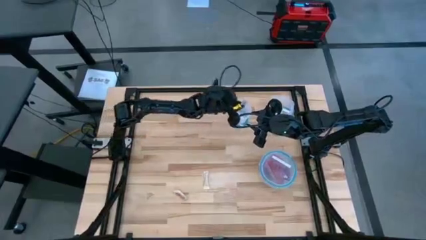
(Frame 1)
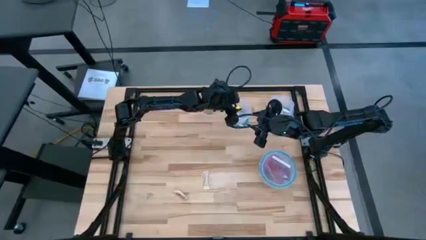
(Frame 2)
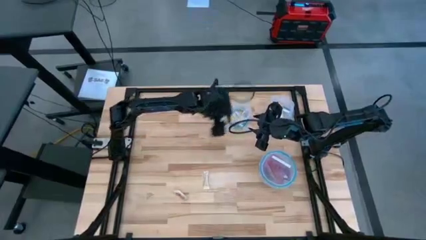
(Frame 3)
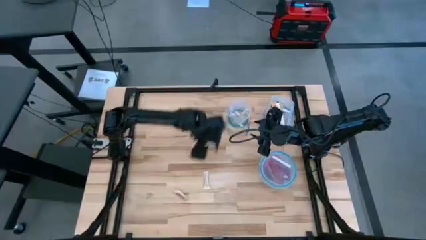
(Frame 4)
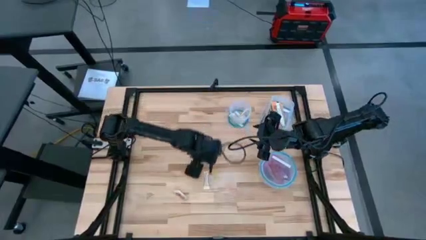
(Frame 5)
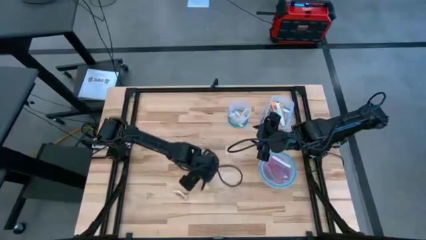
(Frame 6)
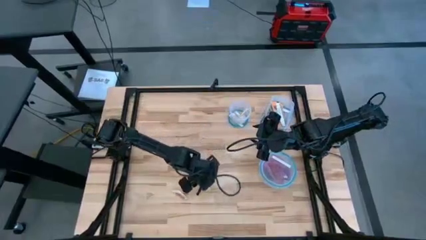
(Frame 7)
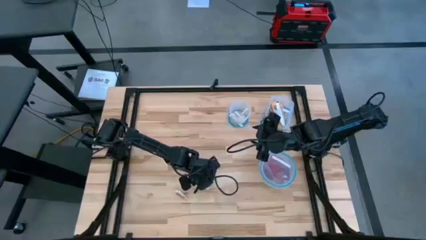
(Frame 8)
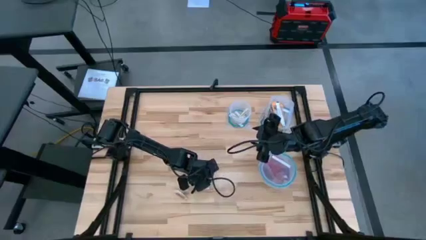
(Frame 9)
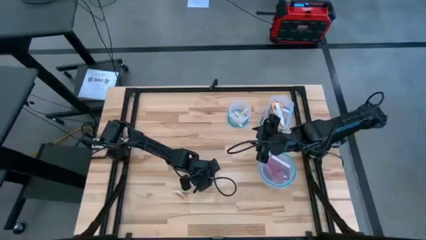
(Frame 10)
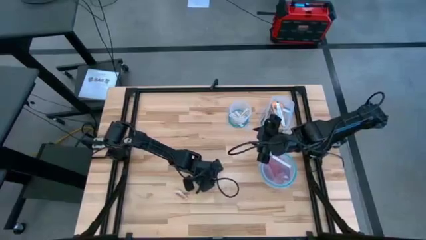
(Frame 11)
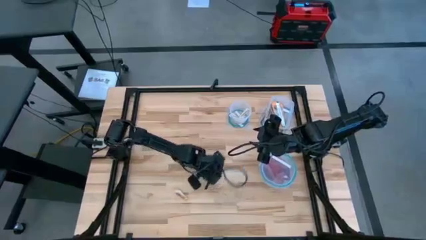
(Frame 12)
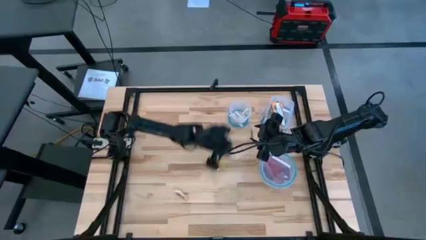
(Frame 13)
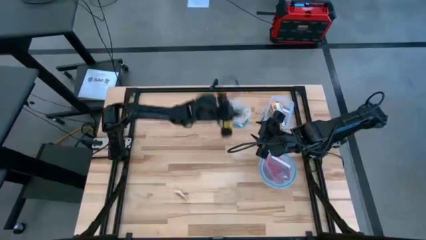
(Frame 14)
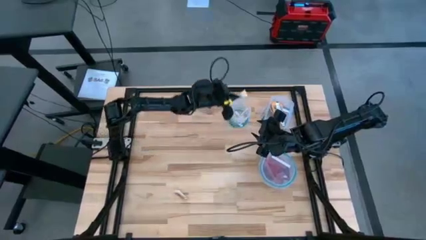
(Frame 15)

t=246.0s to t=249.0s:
Task: Sort candy
Put the white candy into the small round transparent bin

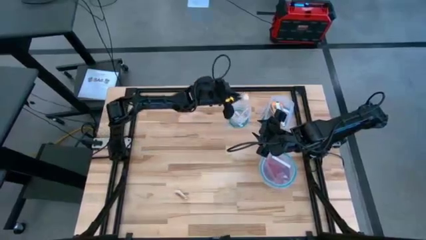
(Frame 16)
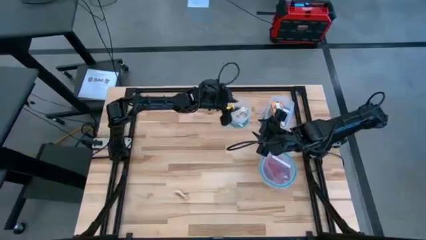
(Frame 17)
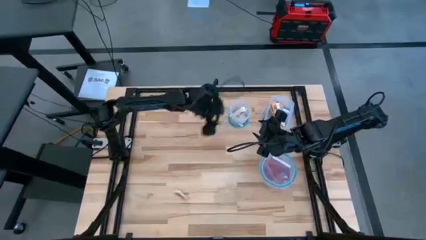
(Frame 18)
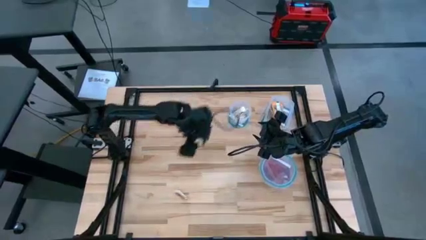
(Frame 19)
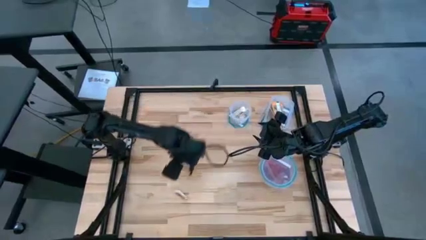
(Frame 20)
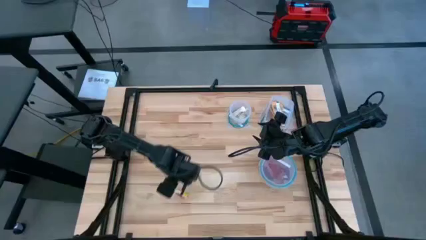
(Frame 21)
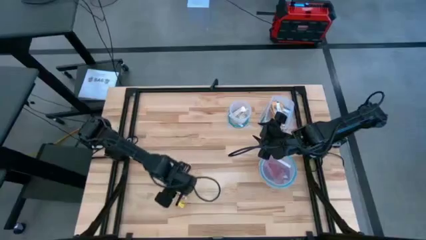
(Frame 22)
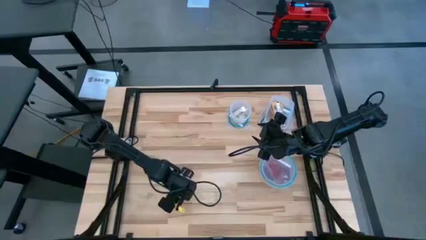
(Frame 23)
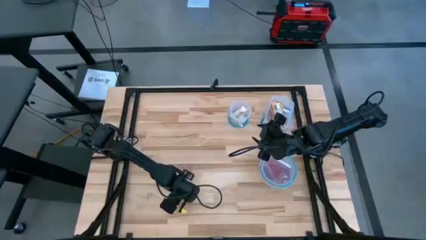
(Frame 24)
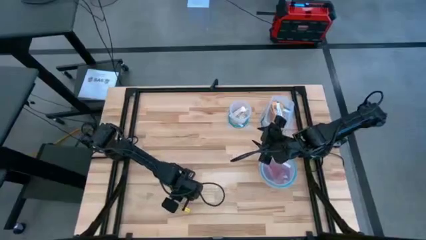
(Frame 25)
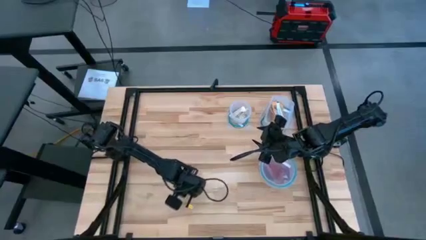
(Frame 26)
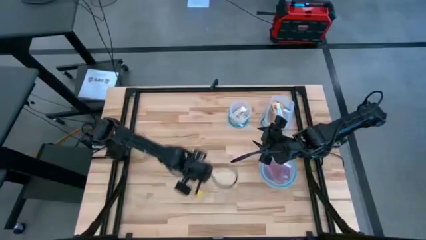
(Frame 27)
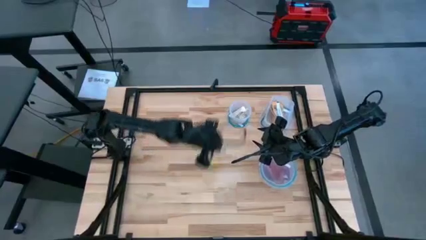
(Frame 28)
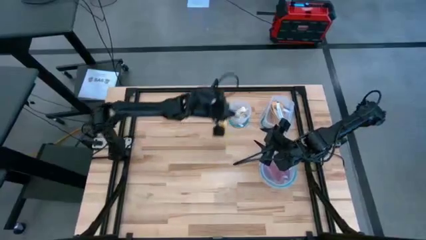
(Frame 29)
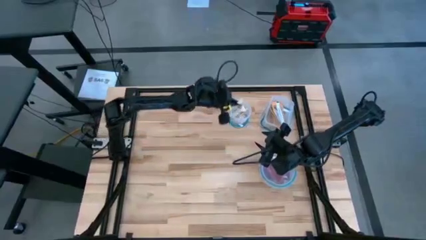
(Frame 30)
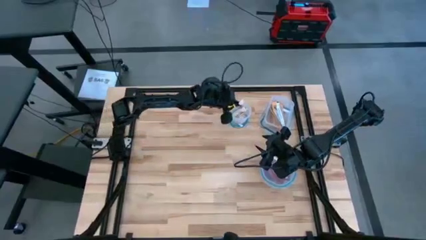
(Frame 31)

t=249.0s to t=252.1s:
Put the white candy into the small round transparent bin

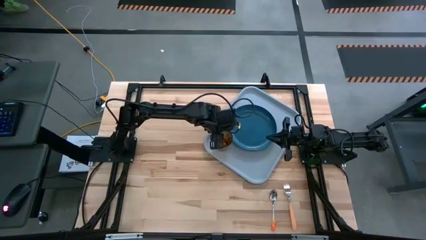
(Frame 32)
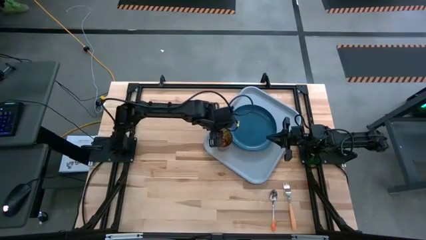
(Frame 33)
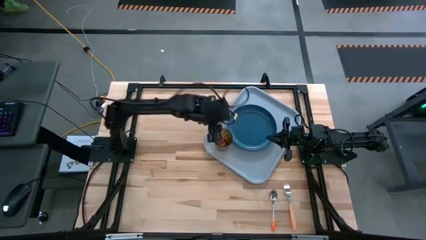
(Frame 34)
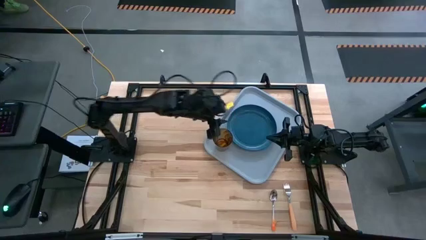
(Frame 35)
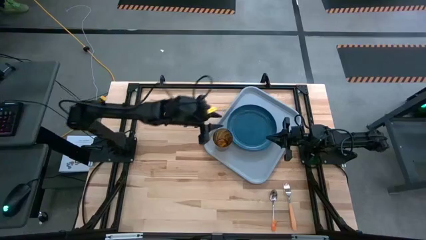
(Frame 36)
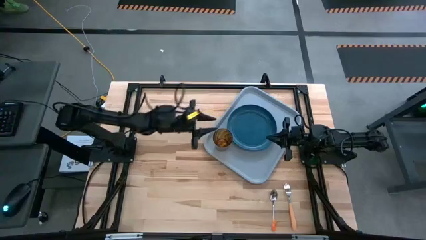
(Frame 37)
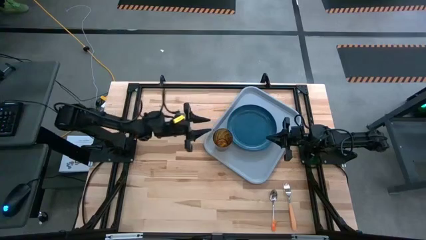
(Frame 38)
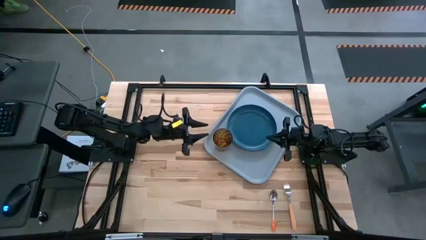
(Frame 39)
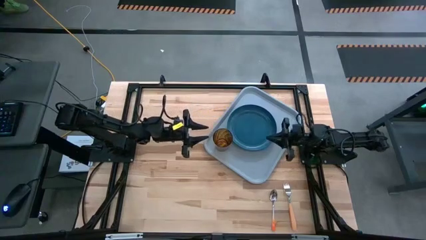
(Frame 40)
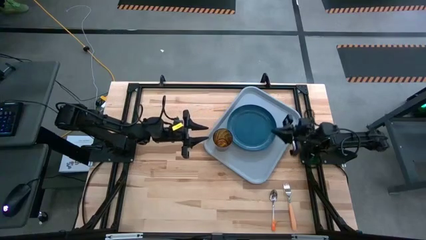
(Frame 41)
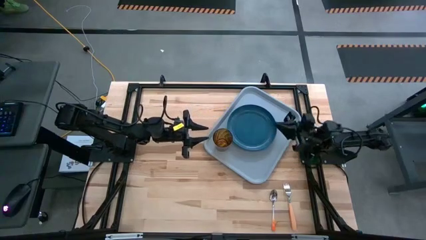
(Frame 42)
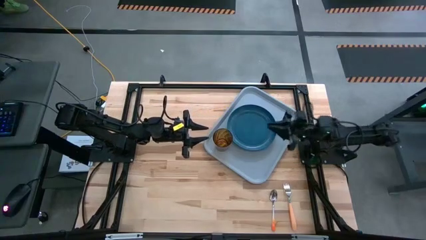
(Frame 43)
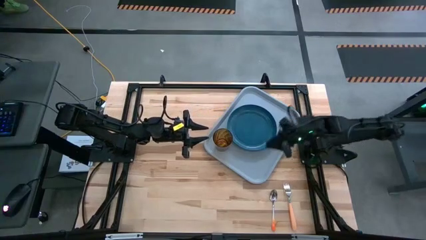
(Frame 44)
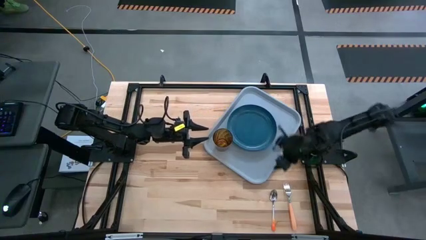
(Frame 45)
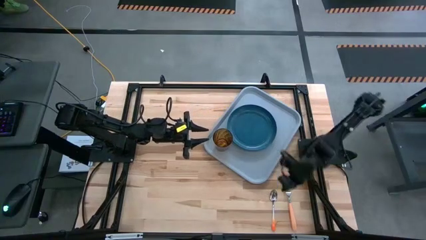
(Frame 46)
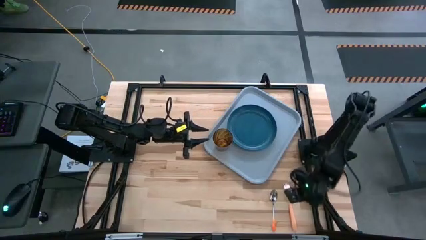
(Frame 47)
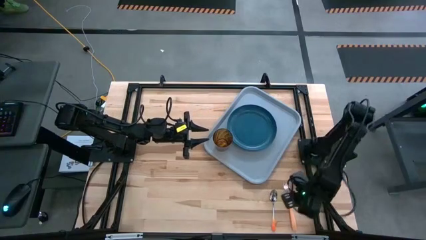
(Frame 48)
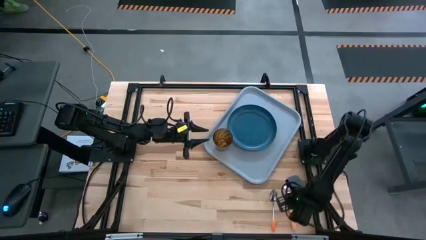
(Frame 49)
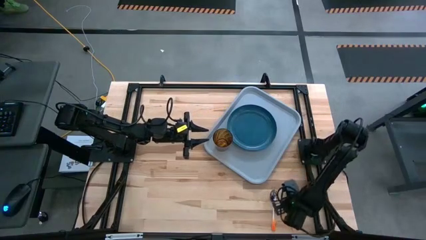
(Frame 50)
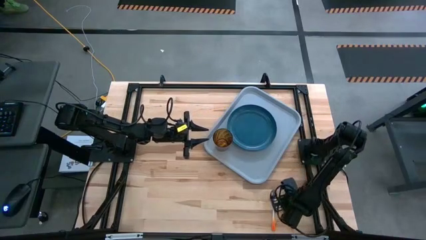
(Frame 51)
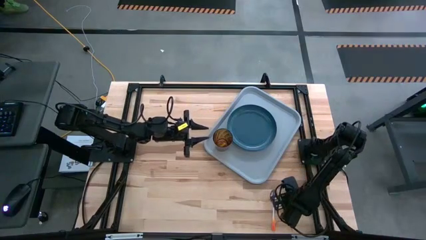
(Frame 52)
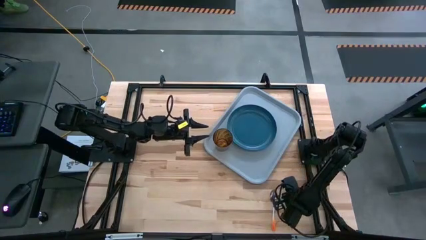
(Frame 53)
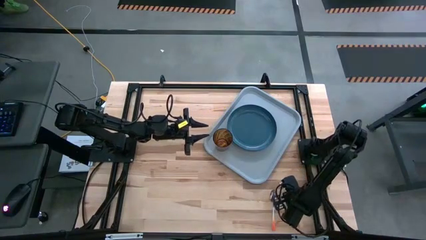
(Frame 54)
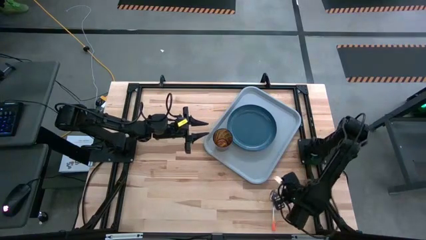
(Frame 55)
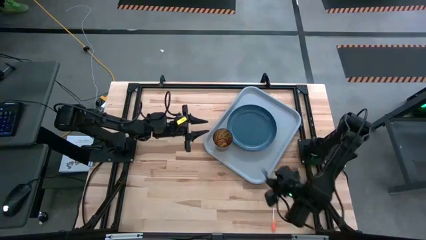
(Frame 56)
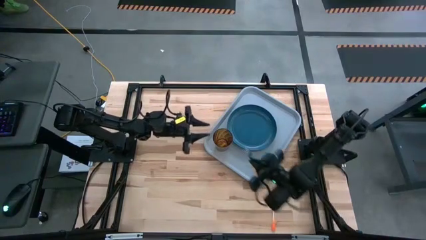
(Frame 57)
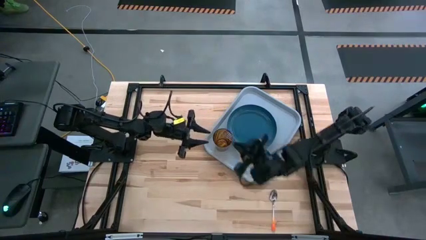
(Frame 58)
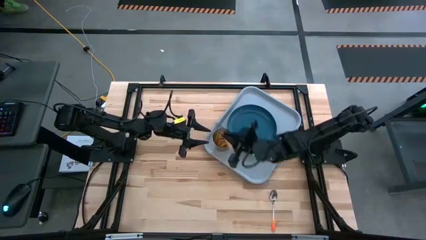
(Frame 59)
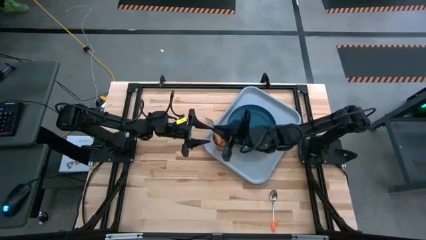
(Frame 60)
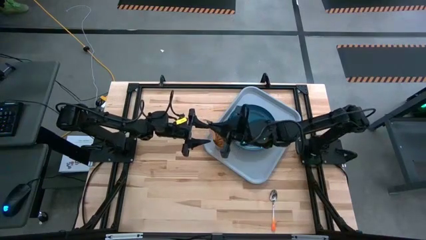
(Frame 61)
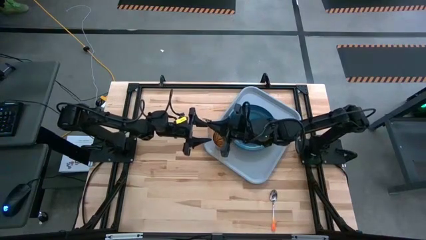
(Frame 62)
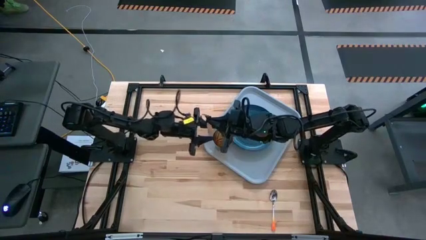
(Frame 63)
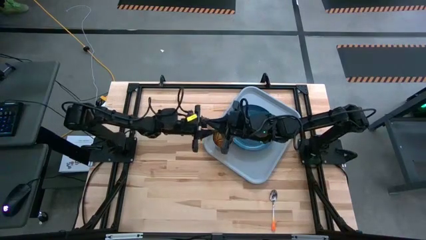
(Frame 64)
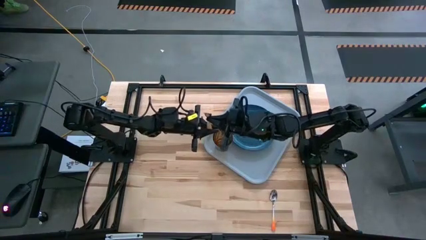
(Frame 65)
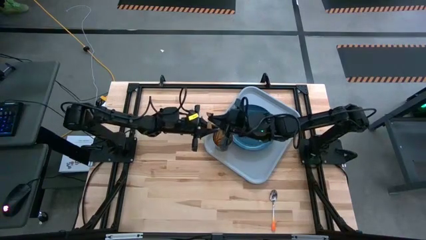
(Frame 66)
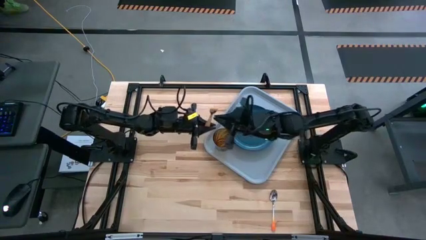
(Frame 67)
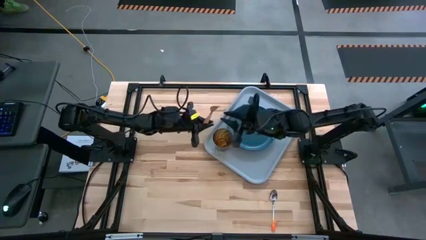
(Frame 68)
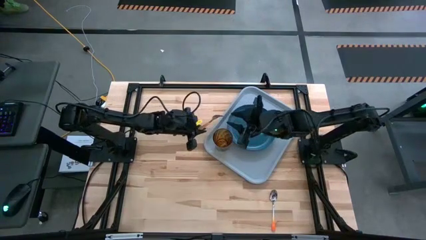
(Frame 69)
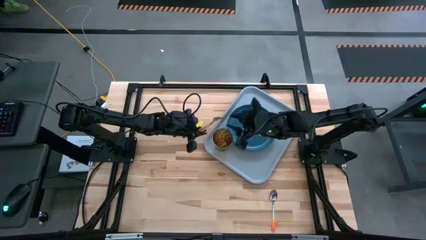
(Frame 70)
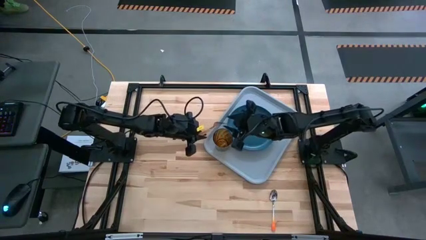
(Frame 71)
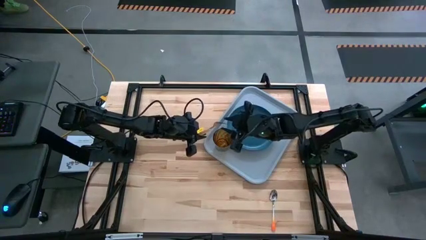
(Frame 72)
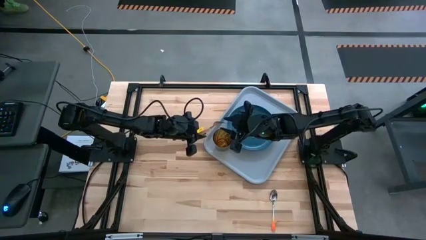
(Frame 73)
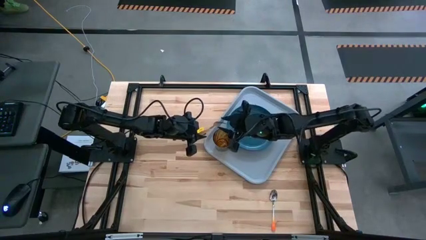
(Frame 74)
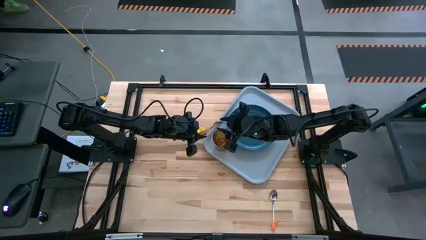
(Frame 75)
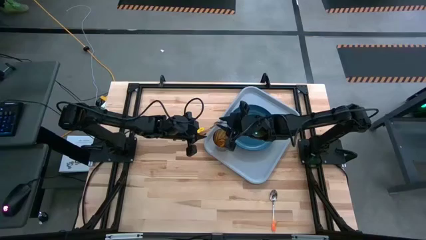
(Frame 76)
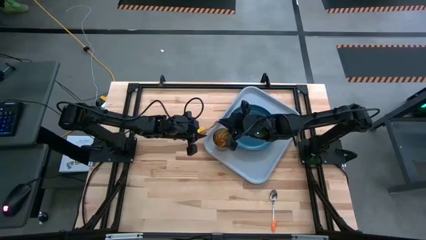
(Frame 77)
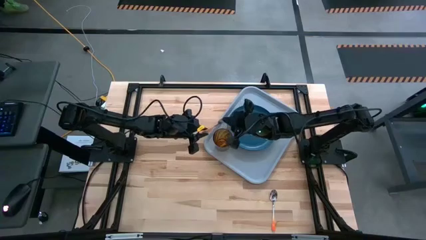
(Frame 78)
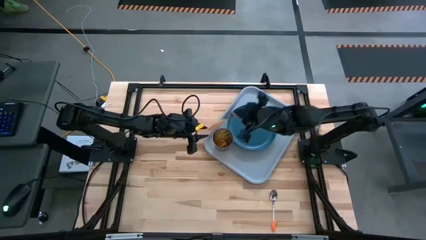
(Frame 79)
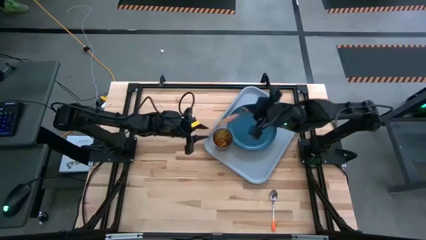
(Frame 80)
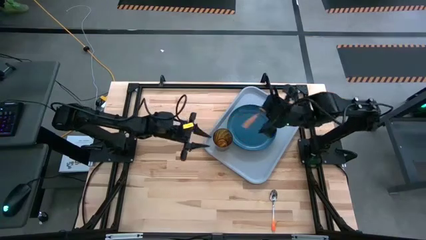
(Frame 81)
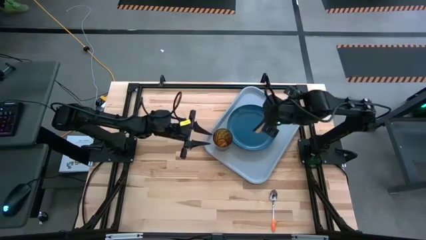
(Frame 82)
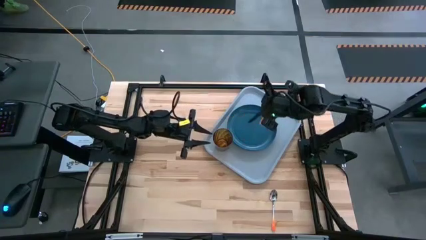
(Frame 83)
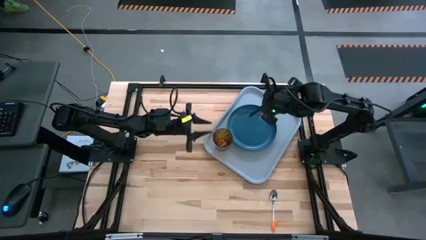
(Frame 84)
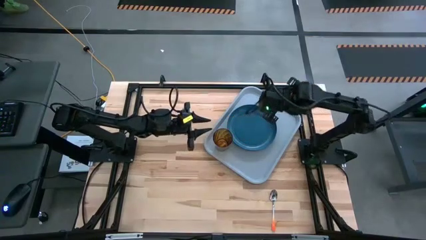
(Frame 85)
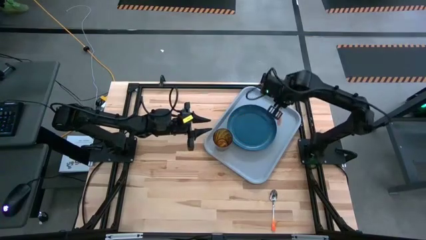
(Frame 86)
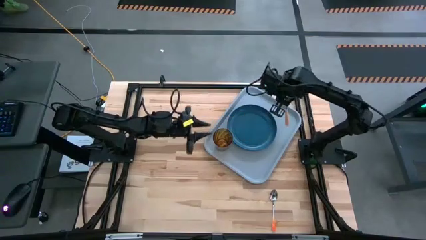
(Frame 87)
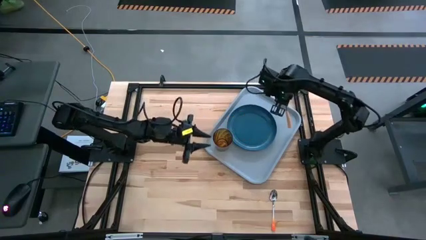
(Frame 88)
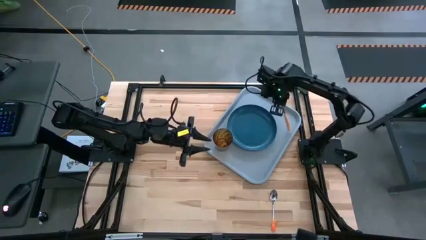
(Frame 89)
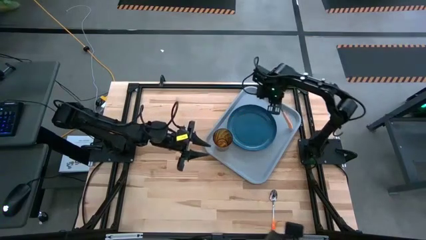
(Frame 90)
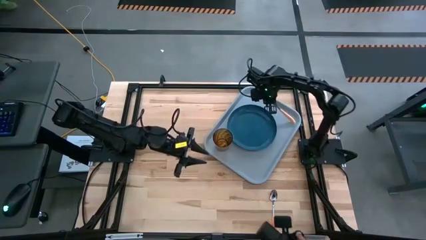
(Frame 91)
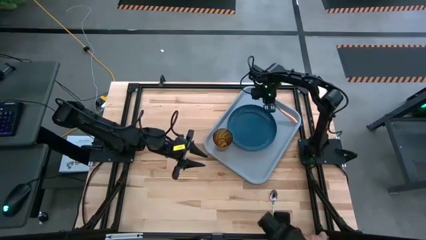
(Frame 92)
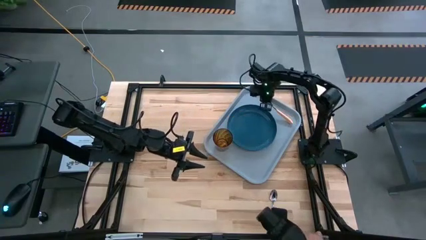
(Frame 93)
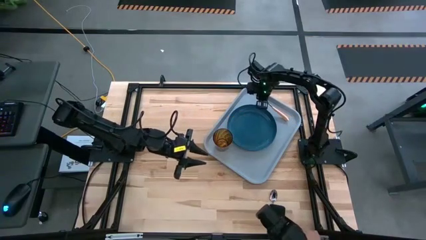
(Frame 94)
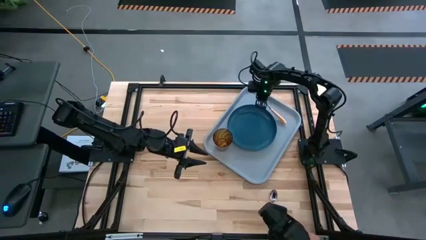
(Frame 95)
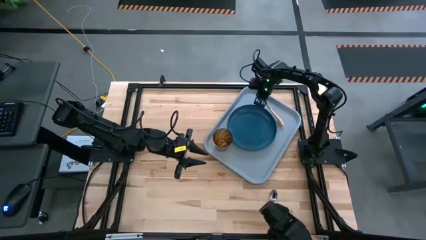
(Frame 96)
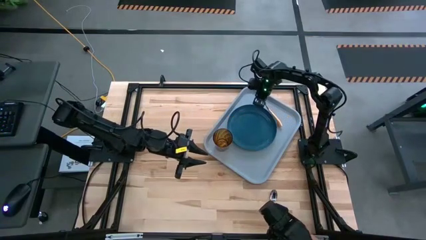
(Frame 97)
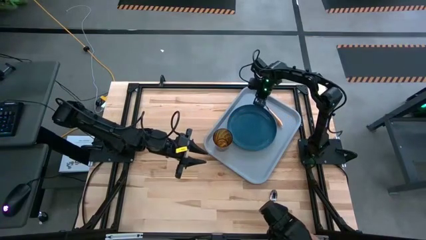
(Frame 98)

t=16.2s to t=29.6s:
Task: Pick and place plate/cup/fork/spoon on tray
Put the orange fork on the blue tray to the right of the blue plate
